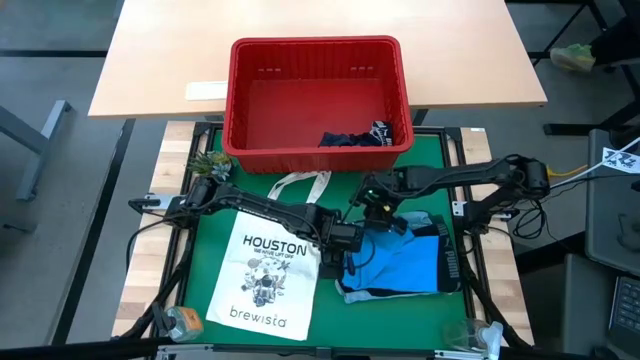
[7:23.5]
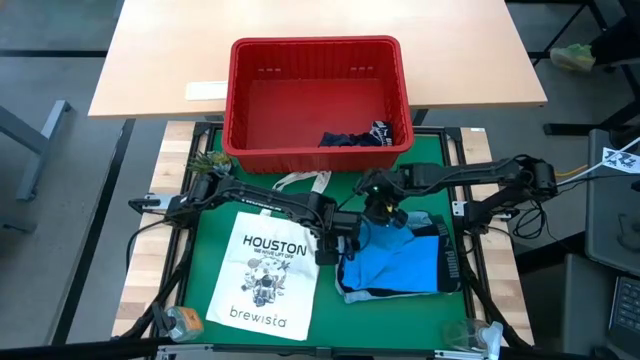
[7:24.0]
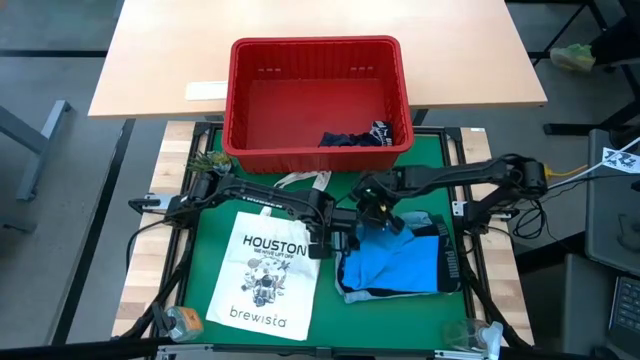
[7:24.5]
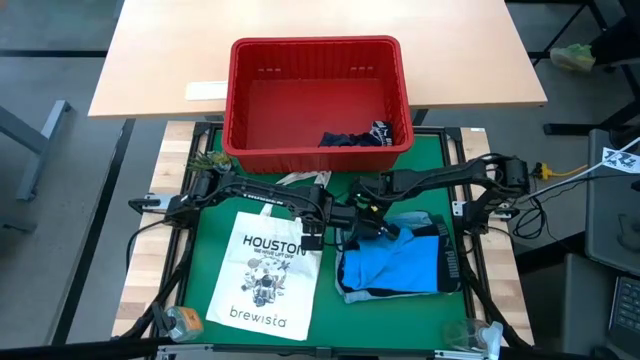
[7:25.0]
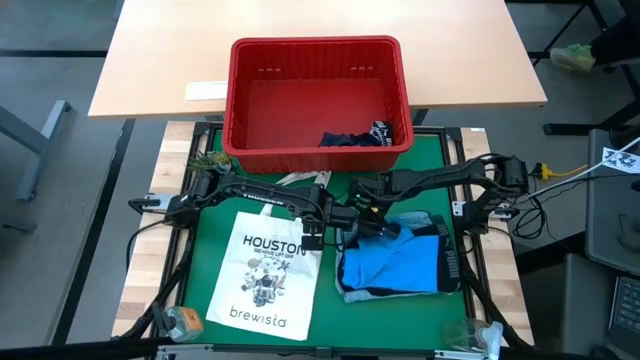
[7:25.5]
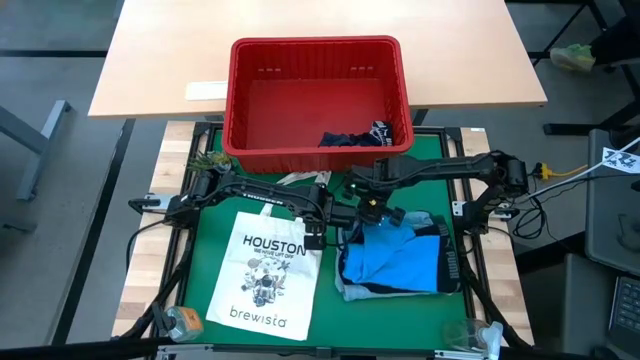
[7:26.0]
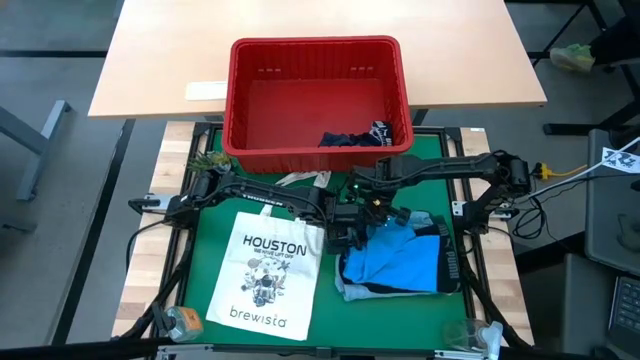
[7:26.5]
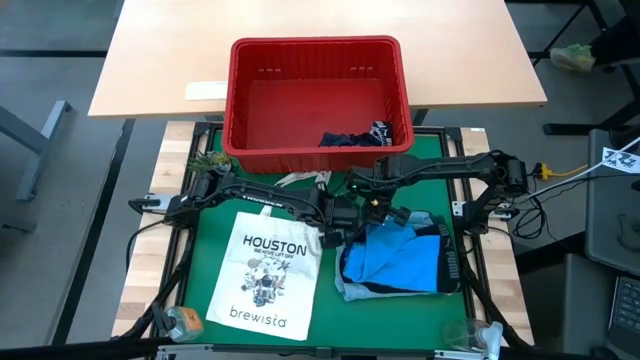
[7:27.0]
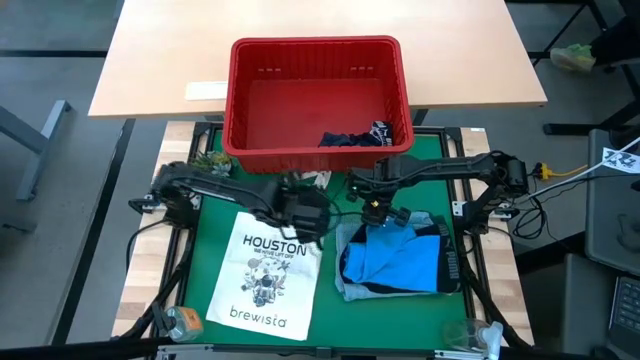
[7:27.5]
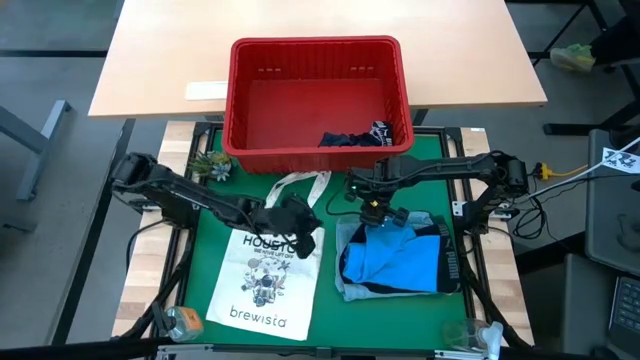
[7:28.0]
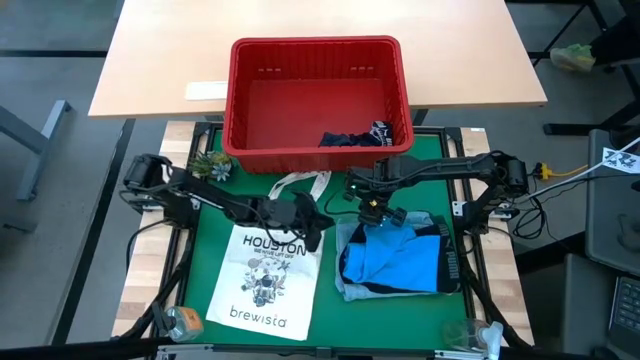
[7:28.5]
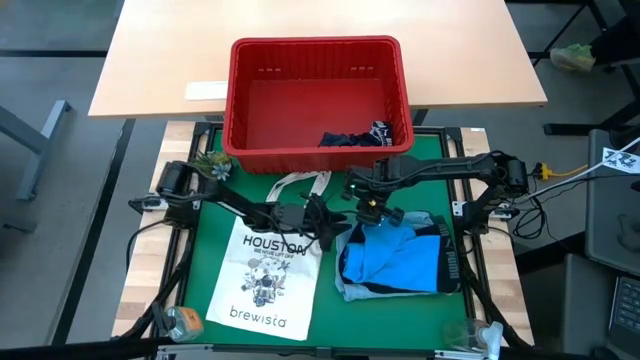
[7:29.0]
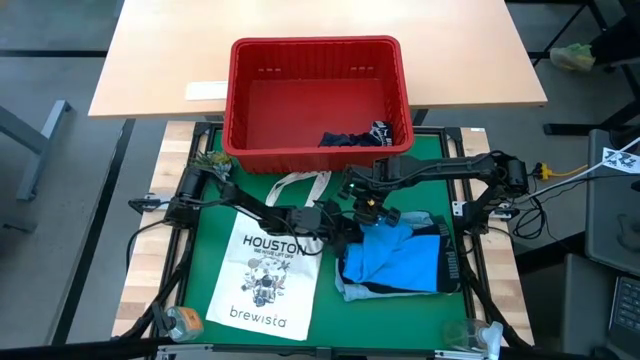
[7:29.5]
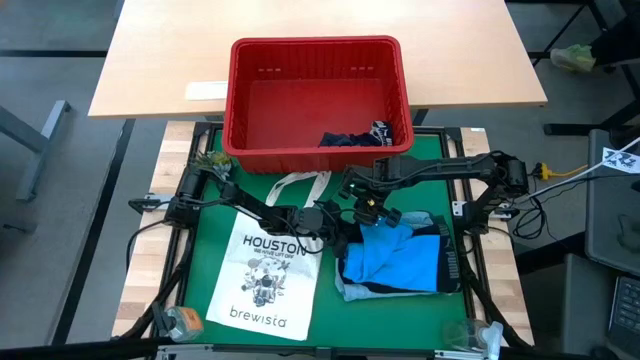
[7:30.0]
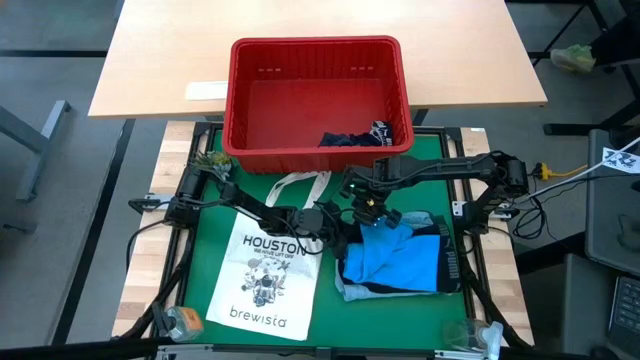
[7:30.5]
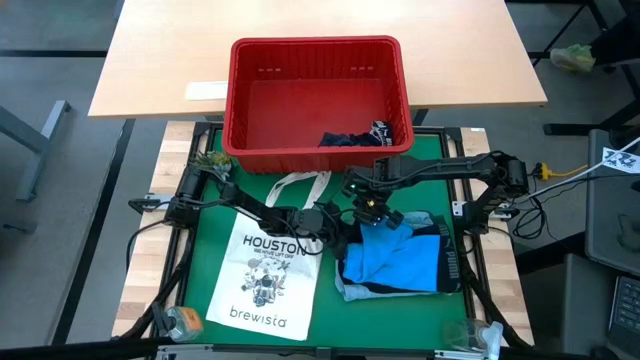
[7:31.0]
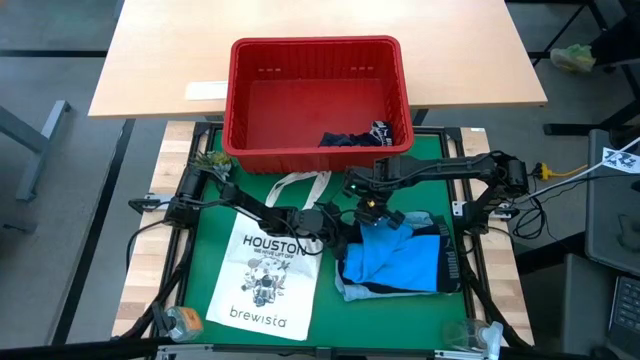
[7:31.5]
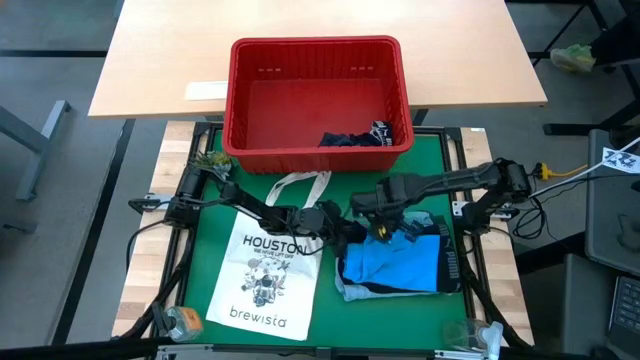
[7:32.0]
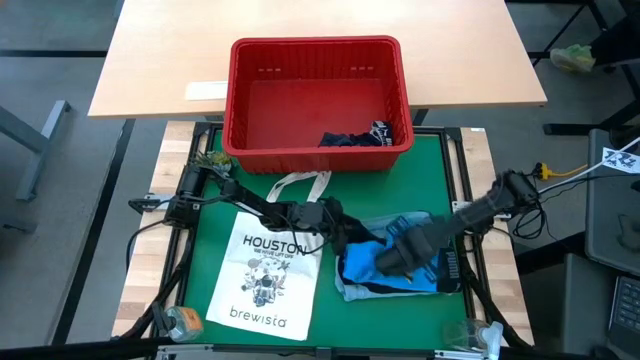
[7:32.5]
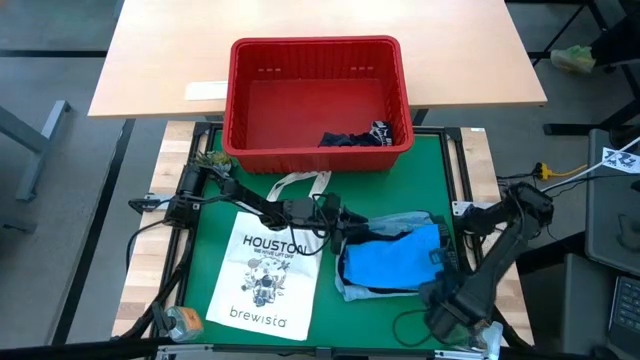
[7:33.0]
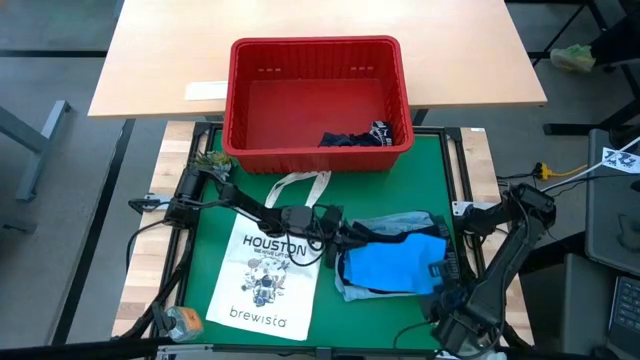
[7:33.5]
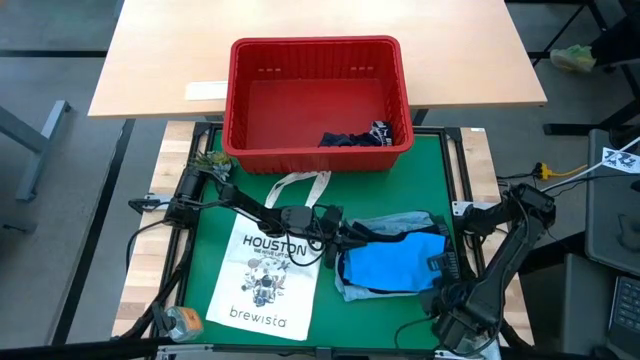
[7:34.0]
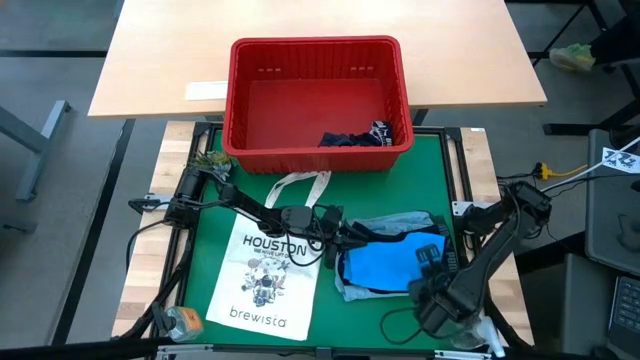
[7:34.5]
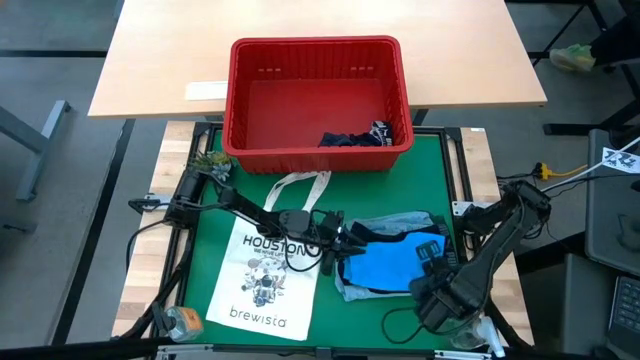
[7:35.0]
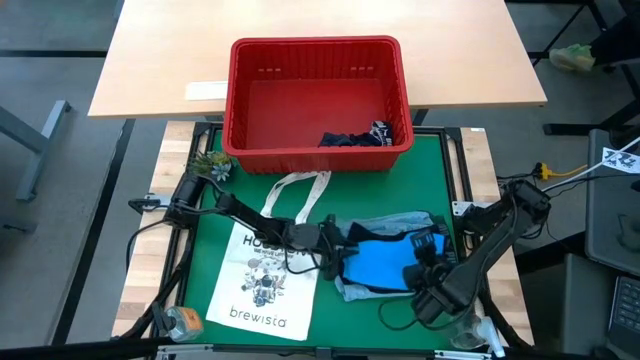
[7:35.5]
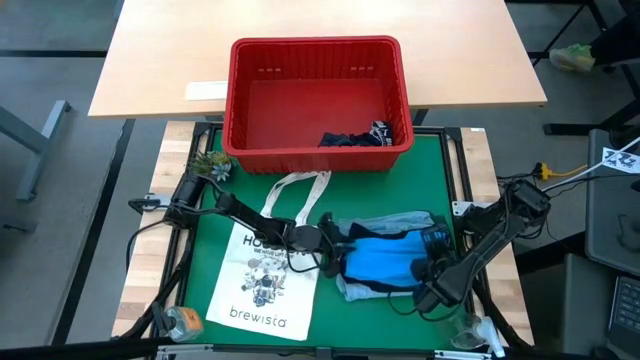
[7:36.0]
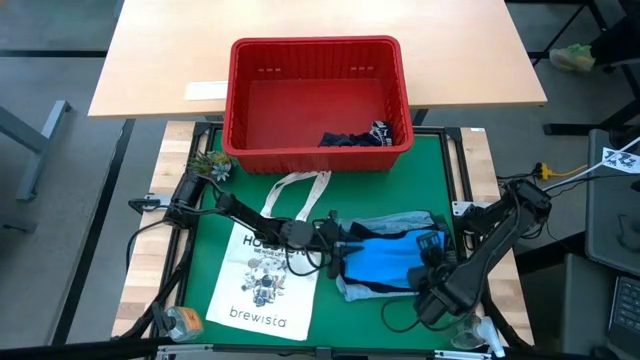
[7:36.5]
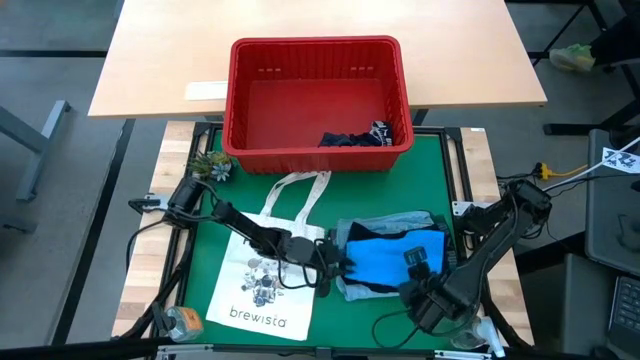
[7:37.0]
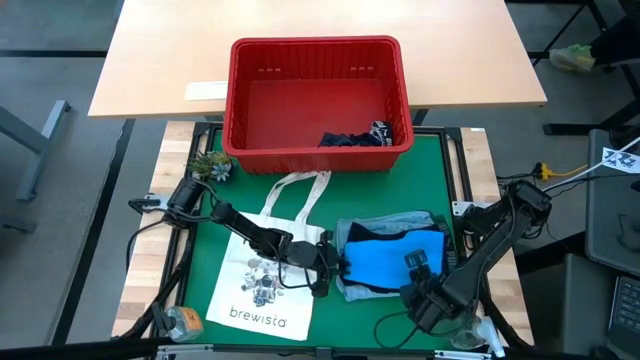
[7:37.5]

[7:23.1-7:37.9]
Task: Fold Laundry from Bin
Fold the blue short

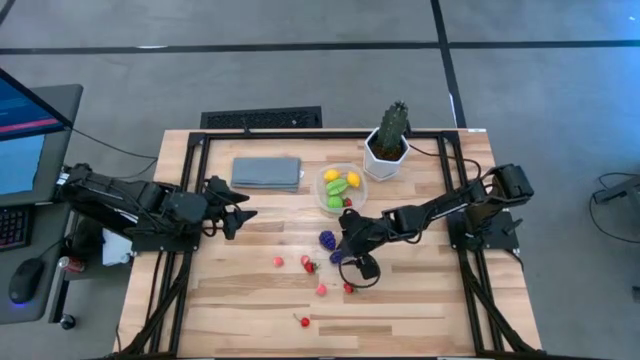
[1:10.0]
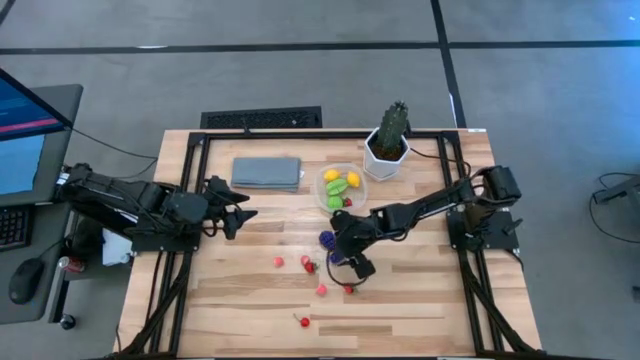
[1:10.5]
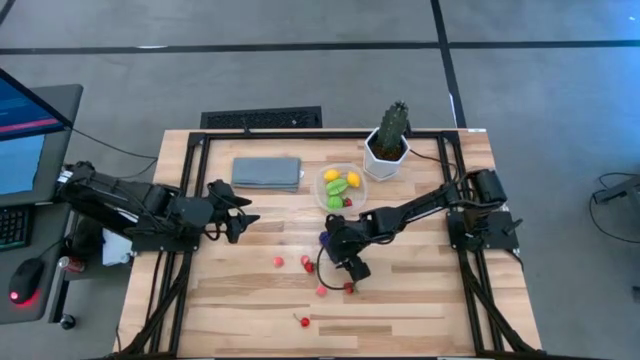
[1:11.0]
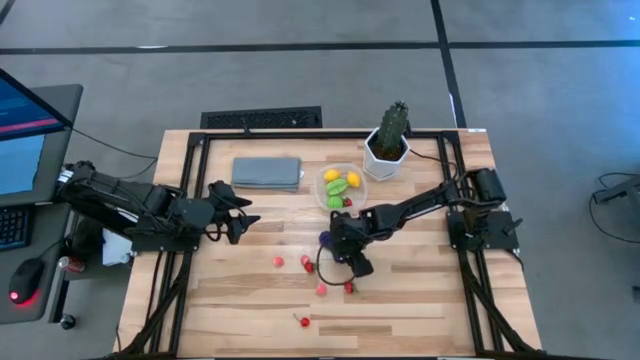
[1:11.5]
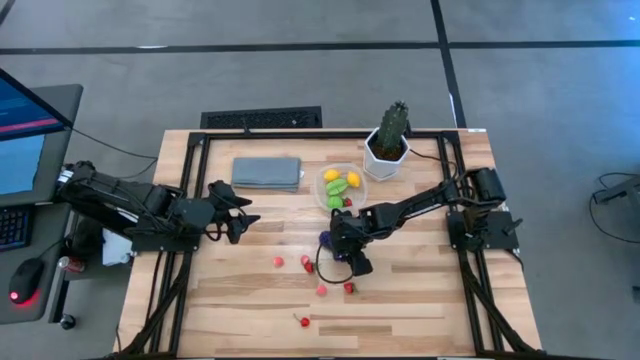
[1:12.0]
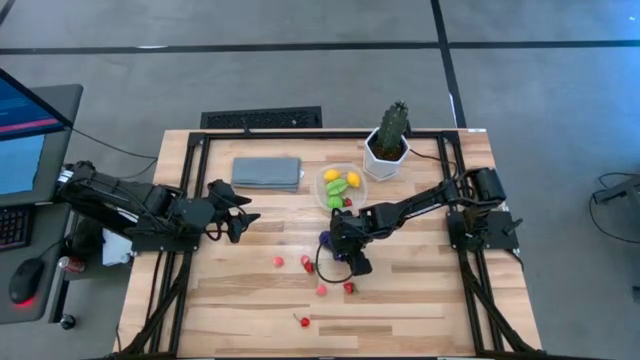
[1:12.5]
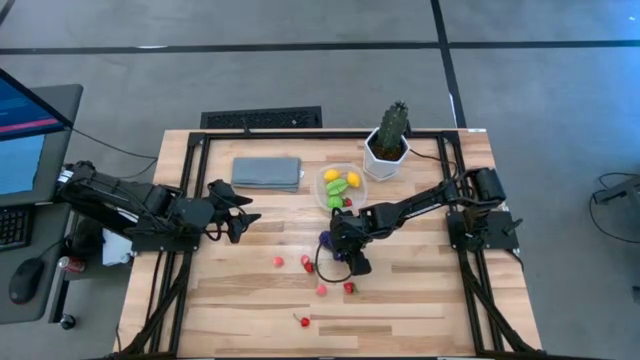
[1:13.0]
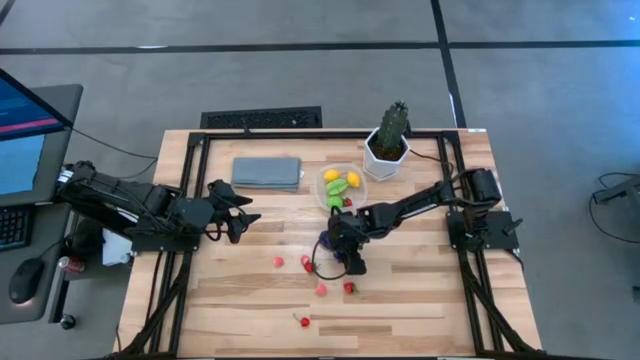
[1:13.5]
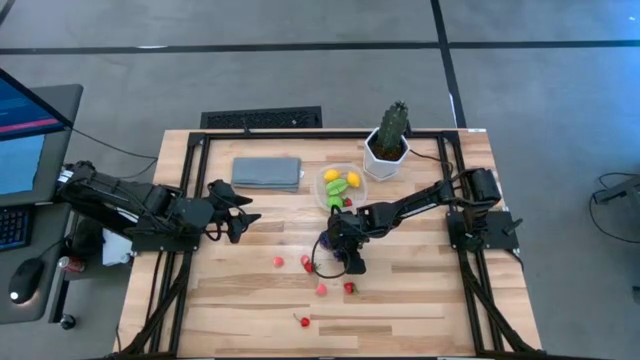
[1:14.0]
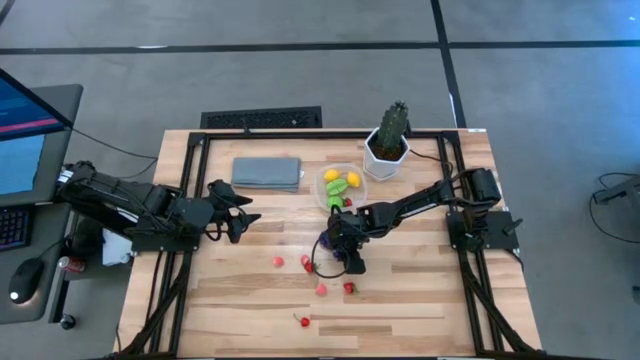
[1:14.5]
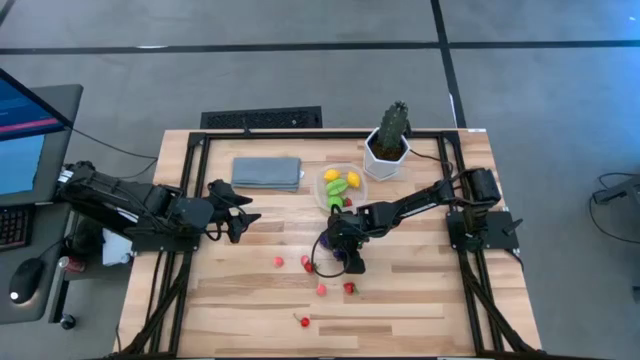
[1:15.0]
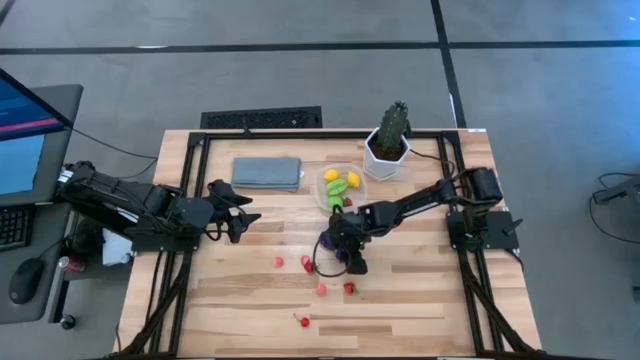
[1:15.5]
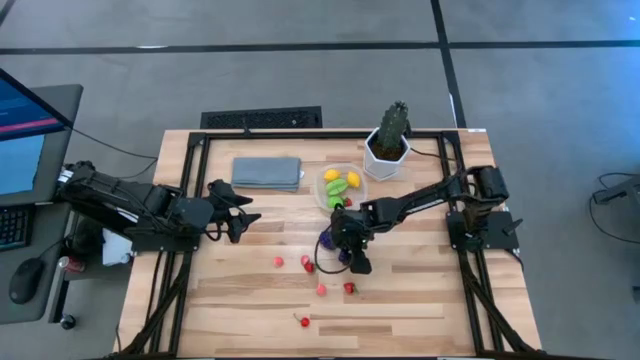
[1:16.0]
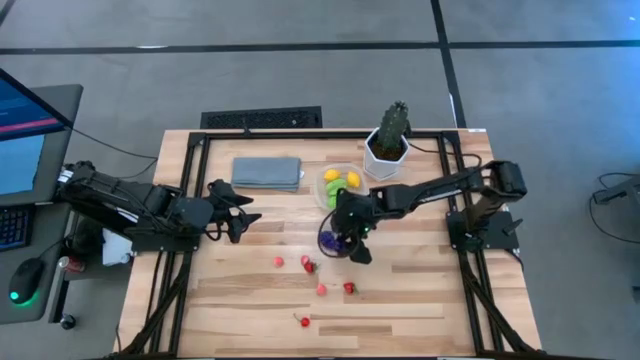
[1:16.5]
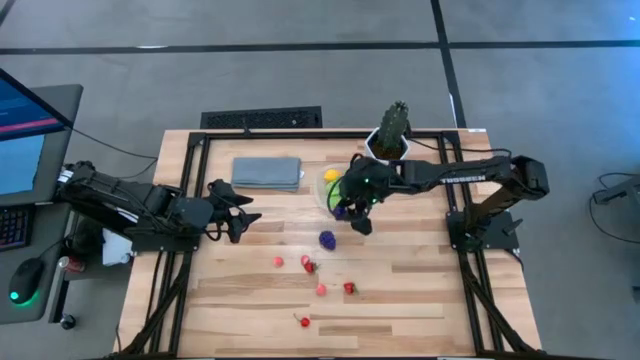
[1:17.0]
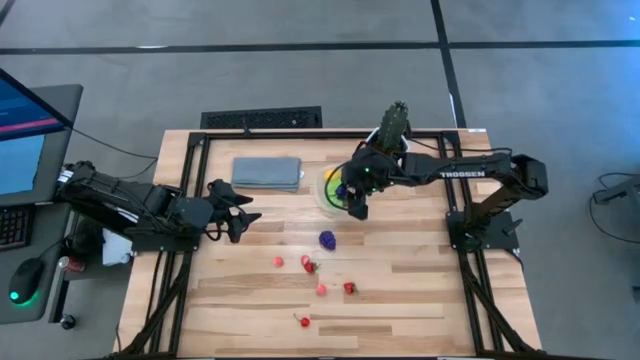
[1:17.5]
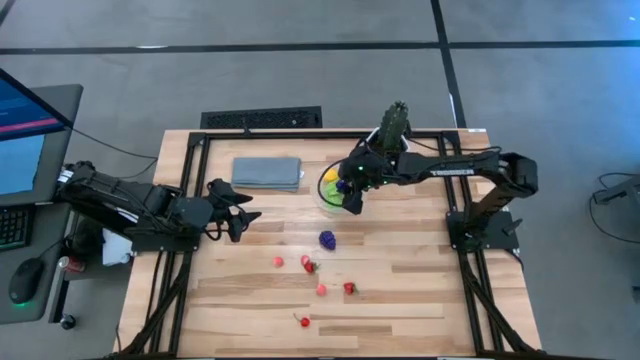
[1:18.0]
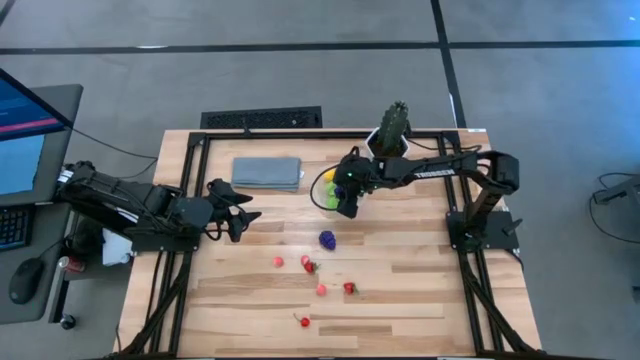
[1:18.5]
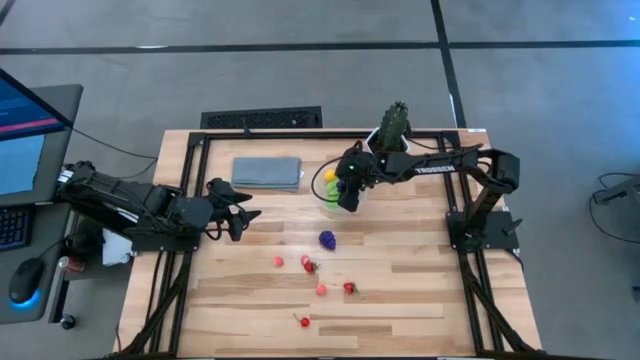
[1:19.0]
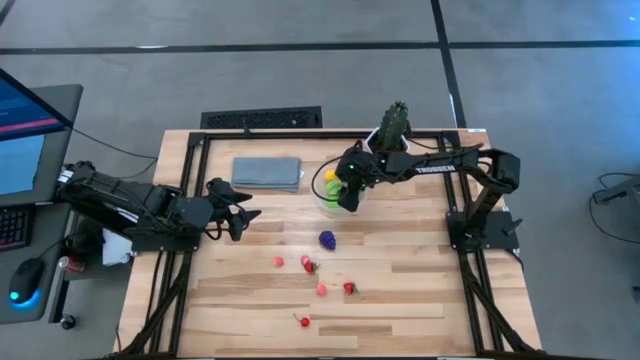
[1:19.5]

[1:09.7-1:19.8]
Task: Pick and placing Produce into tupperware
Put the eggplant into the transparent bin
